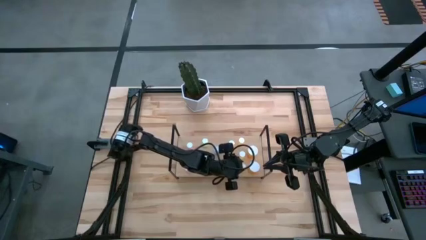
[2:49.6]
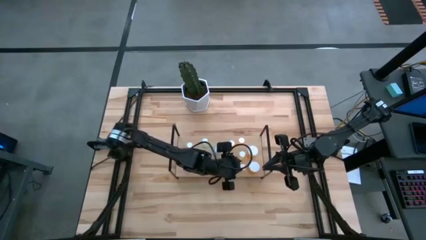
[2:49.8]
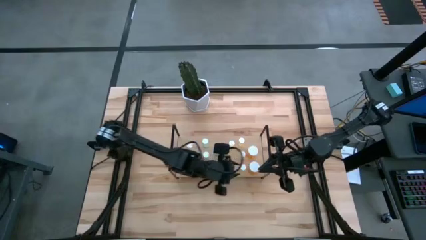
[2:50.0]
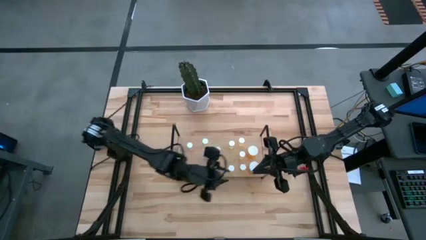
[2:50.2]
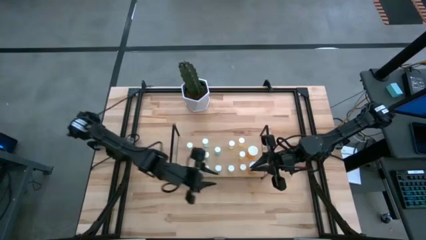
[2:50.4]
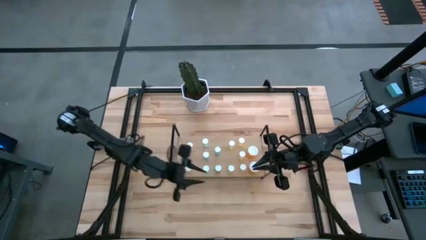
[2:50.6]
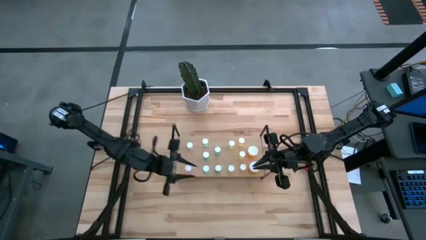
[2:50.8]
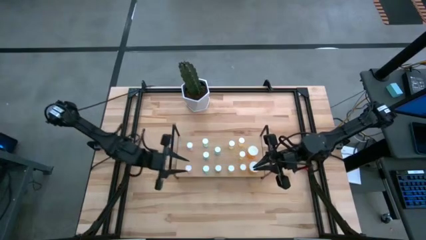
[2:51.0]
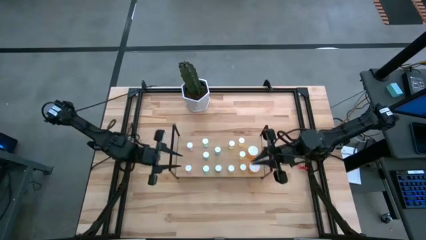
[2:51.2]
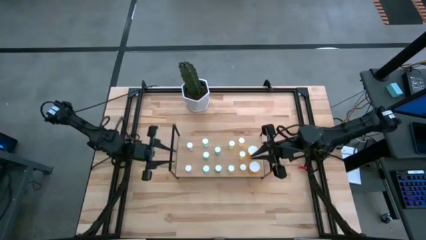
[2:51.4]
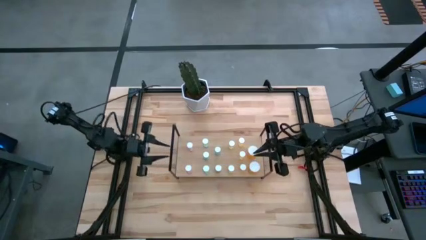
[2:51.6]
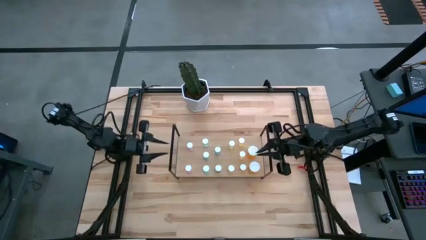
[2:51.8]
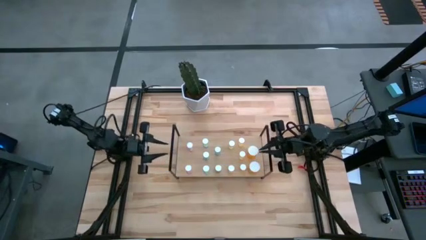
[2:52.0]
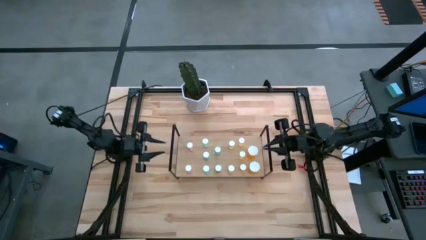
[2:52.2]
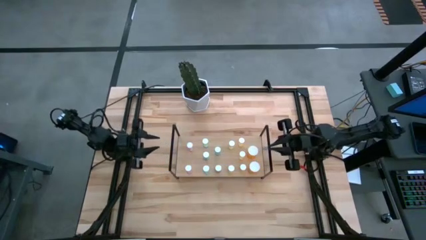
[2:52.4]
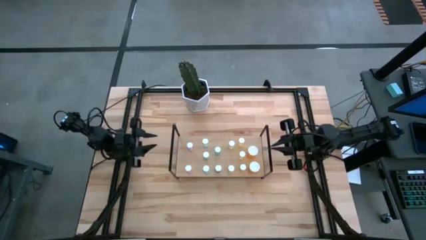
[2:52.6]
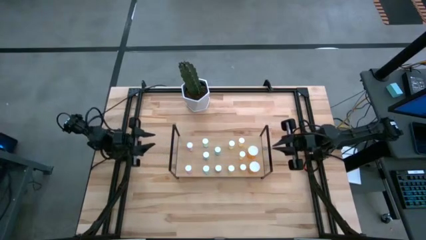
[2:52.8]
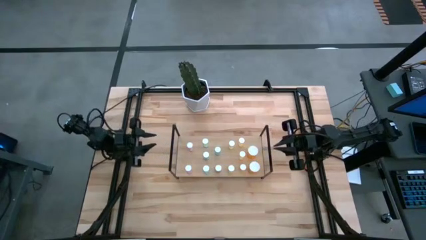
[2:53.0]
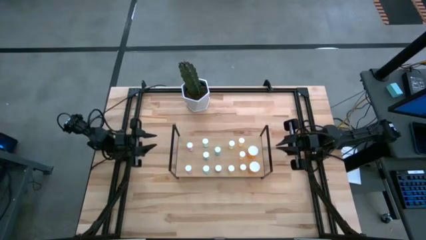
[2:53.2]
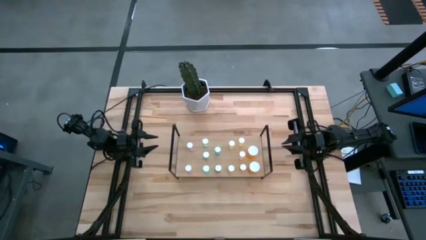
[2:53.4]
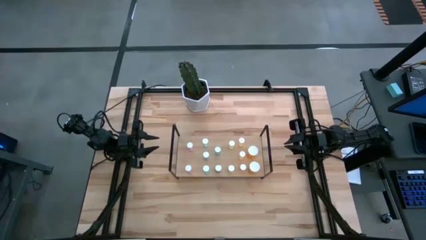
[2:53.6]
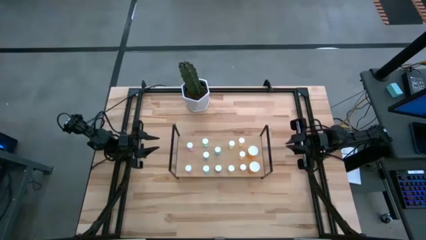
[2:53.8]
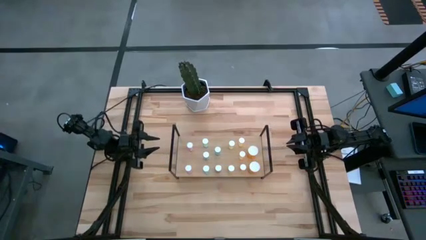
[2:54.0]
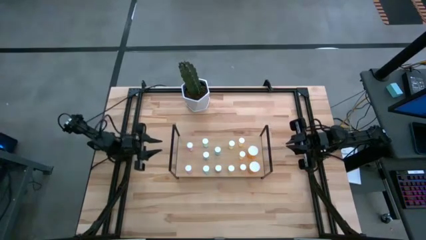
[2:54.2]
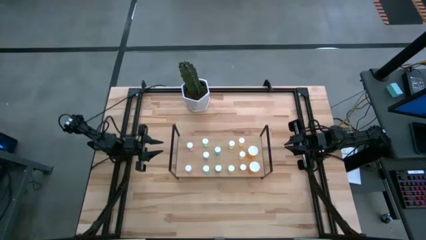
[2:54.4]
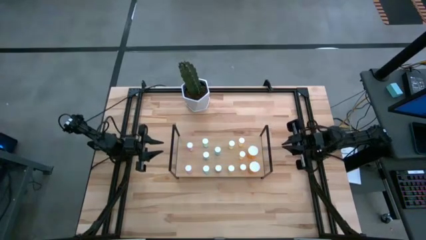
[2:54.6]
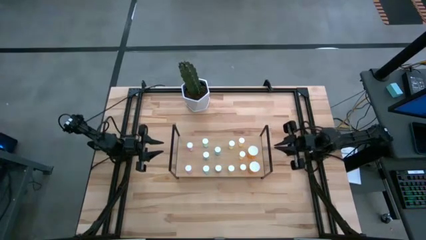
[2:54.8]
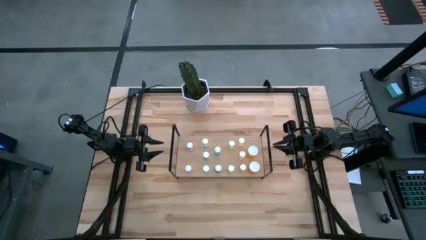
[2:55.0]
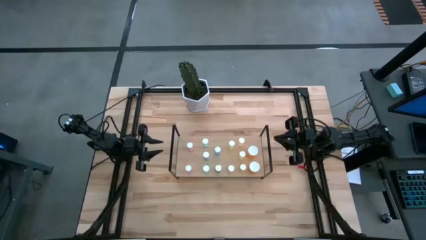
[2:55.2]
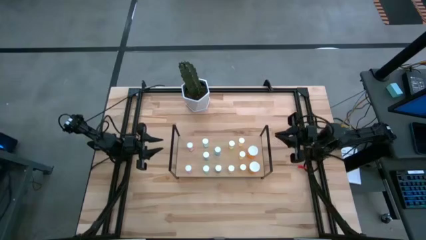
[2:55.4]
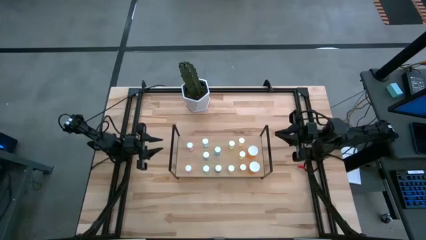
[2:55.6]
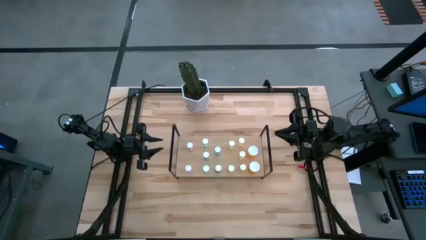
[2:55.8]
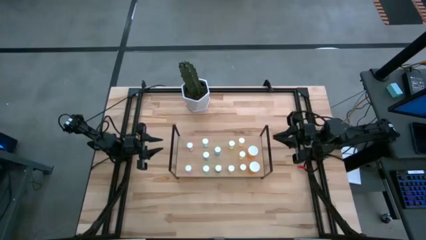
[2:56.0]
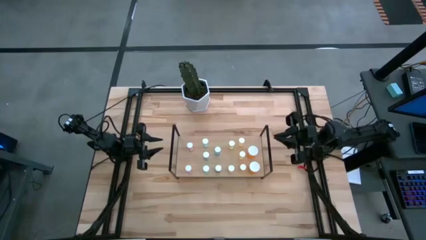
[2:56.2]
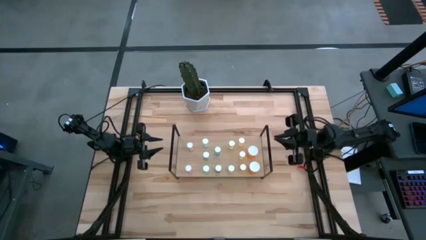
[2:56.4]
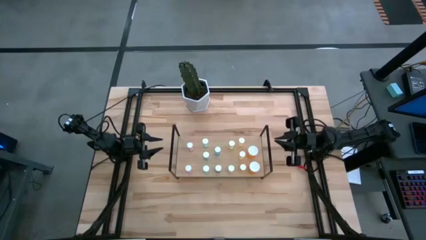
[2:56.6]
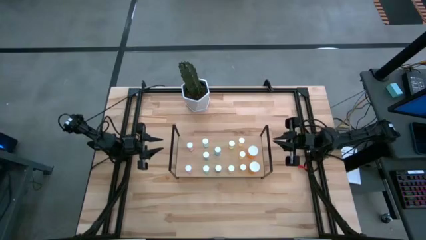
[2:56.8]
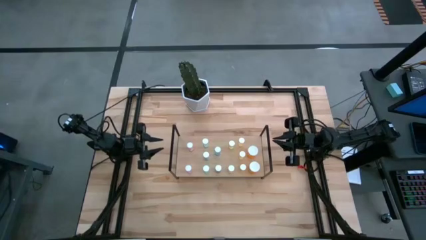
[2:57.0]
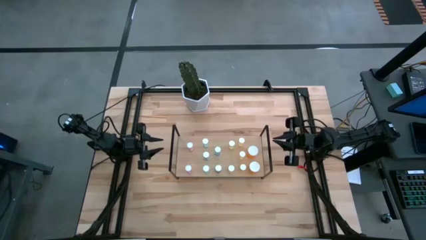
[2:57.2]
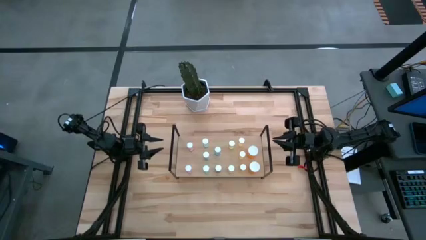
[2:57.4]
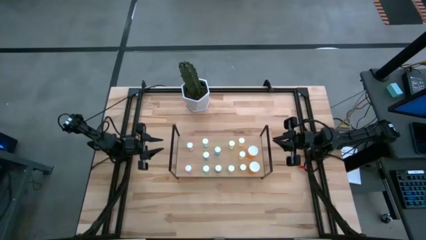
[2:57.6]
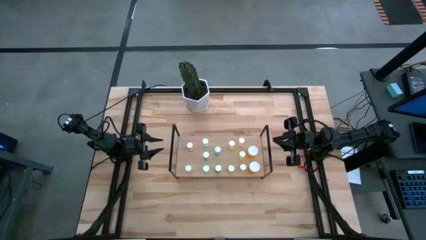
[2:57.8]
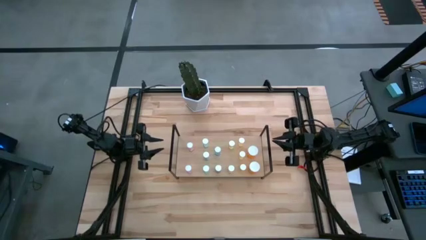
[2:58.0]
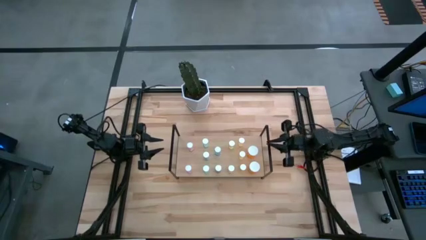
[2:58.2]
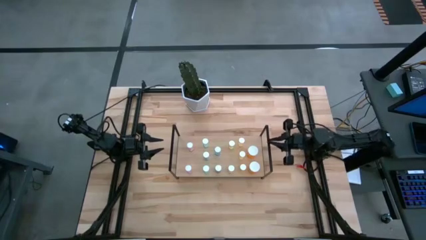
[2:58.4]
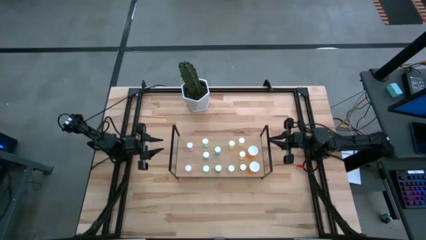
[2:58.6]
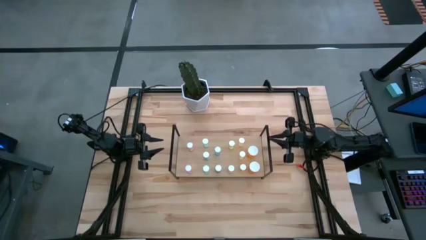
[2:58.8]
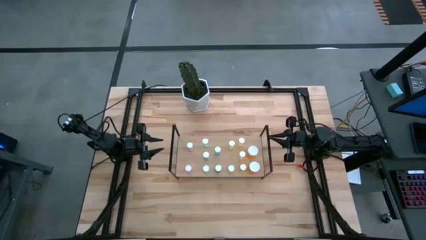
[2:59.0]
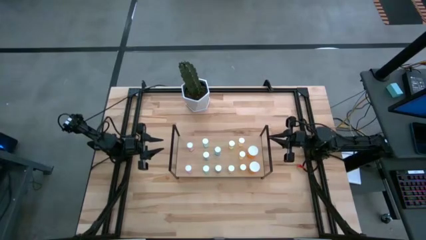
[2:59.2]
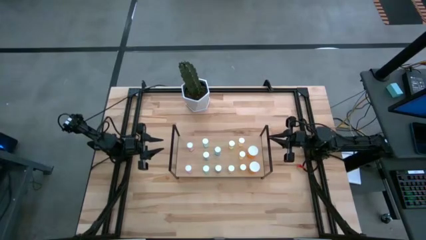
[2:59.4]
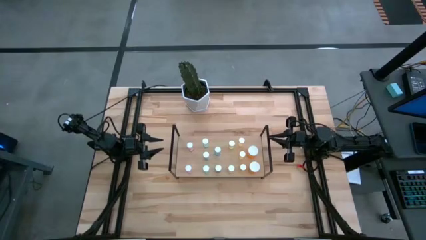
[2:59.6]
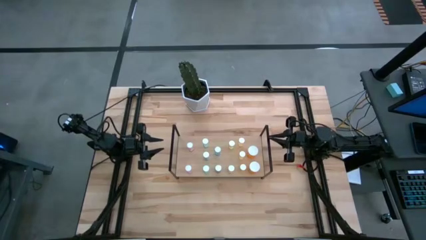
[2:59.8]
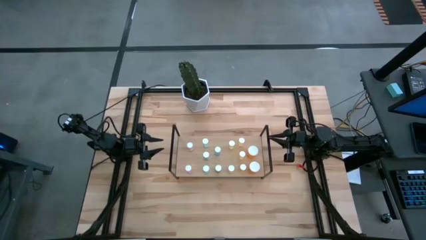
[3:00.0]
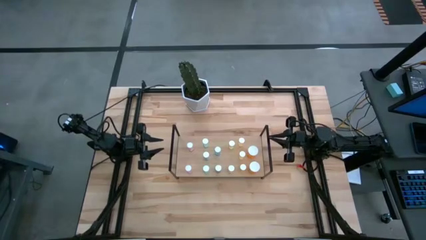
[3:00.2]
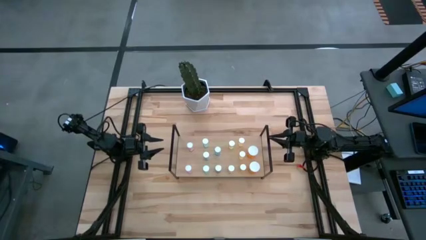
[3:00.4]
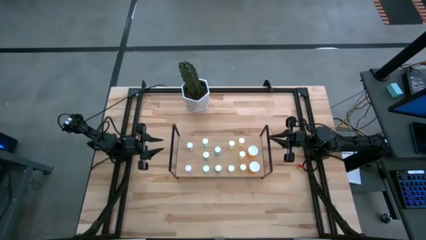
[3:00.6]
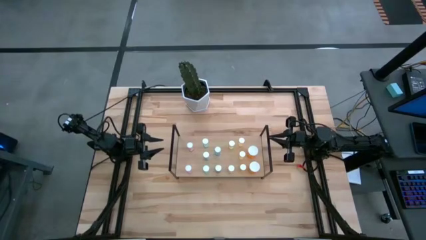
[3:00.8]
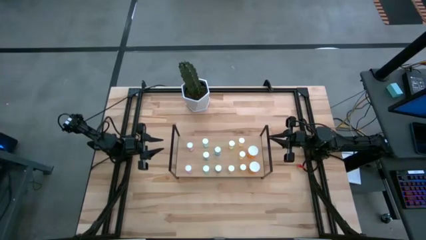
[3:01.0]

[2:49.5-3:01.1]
Task: Pick and place medicine bottles onto shelf by color
Return to Home Position
